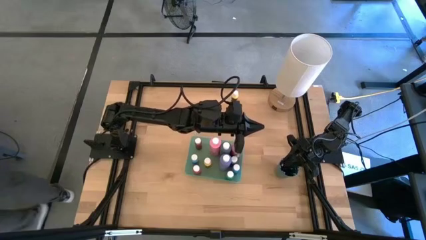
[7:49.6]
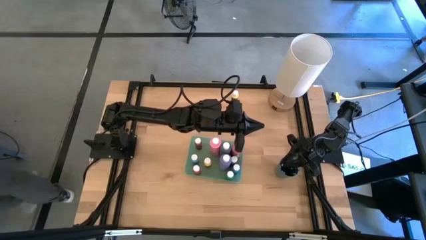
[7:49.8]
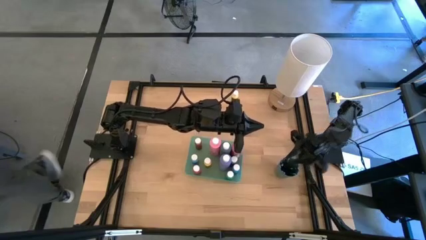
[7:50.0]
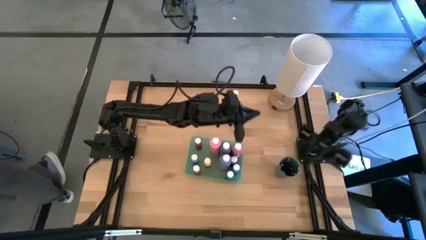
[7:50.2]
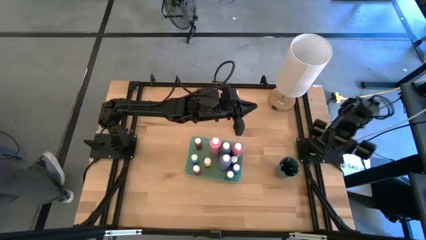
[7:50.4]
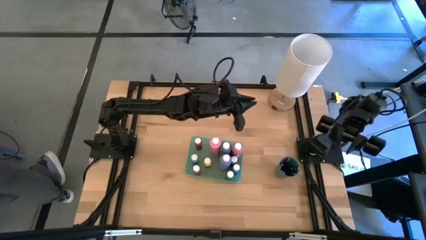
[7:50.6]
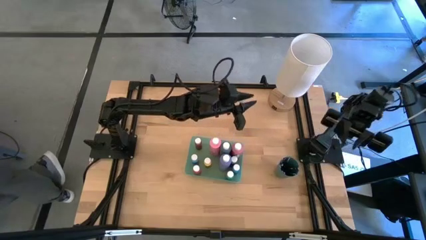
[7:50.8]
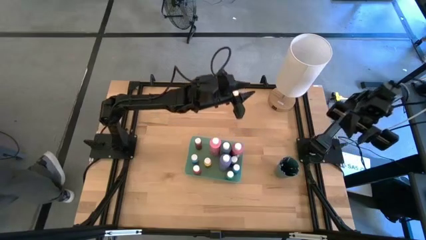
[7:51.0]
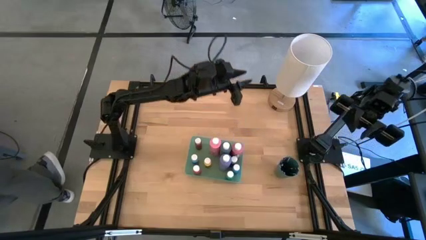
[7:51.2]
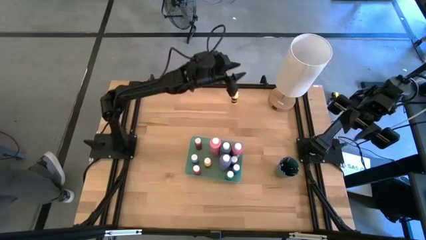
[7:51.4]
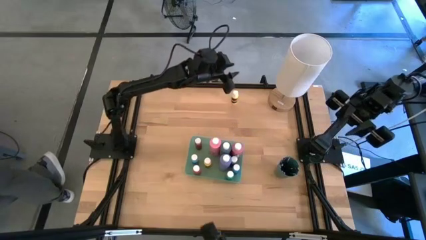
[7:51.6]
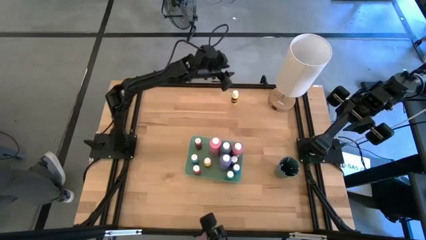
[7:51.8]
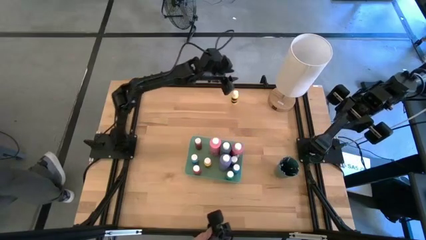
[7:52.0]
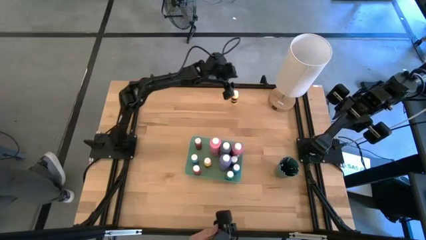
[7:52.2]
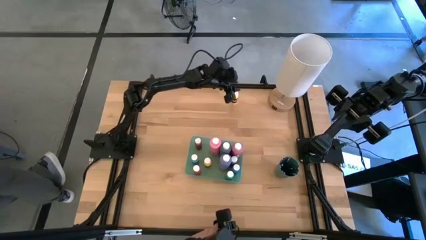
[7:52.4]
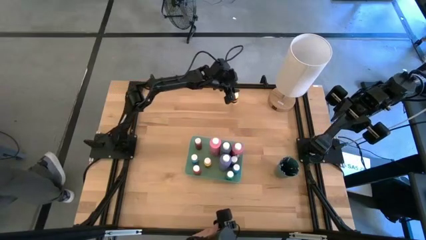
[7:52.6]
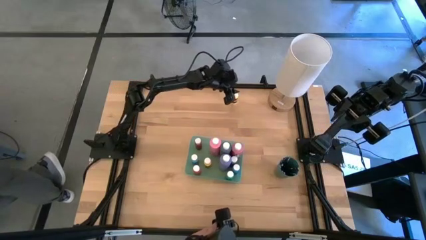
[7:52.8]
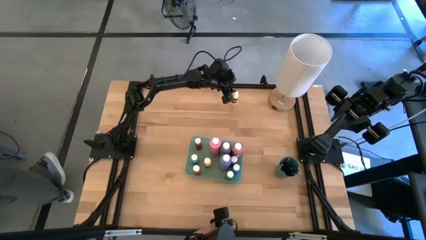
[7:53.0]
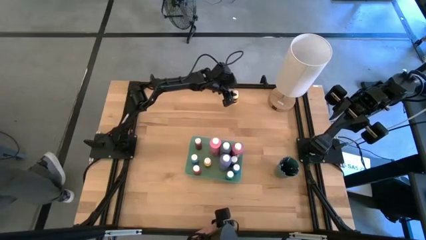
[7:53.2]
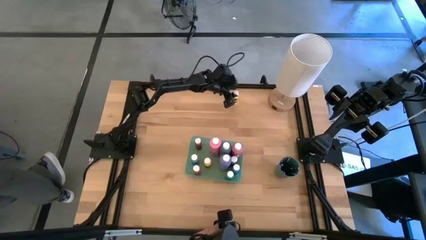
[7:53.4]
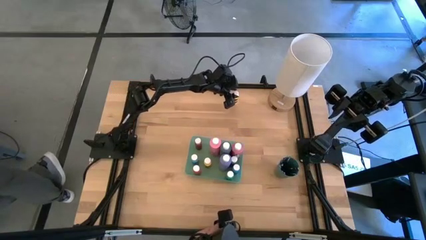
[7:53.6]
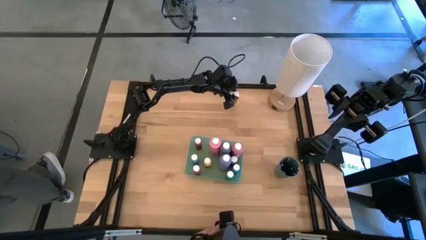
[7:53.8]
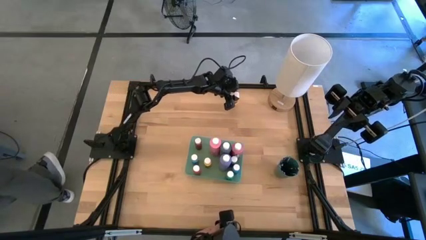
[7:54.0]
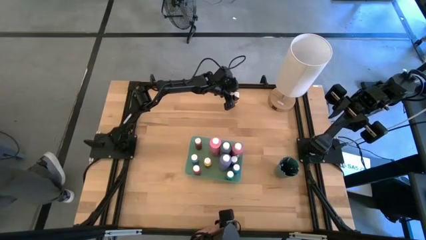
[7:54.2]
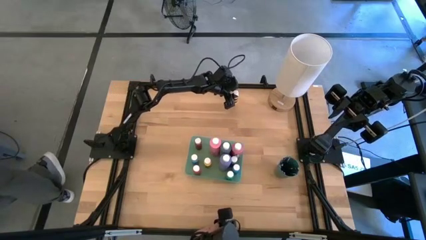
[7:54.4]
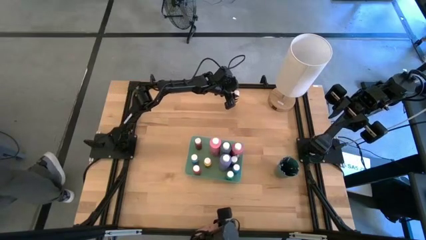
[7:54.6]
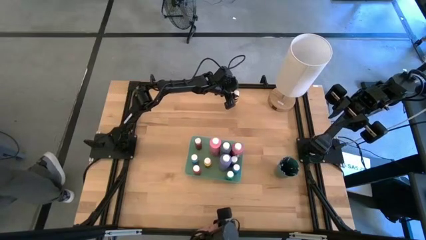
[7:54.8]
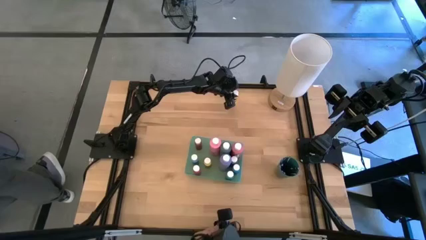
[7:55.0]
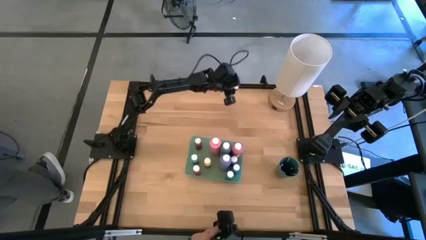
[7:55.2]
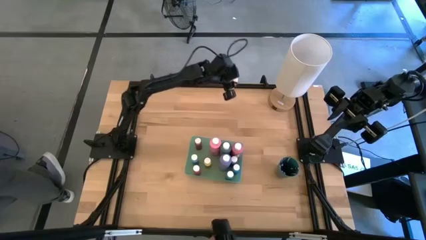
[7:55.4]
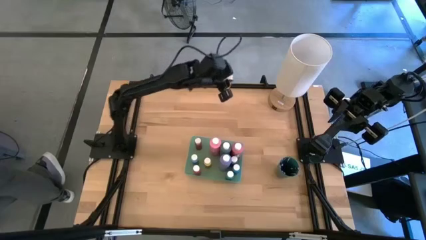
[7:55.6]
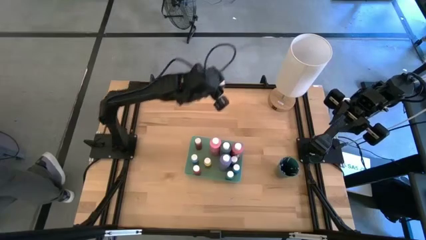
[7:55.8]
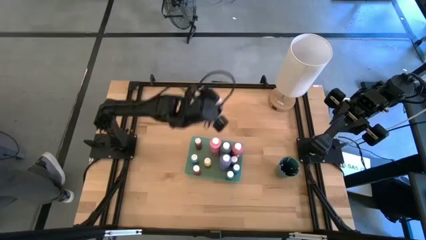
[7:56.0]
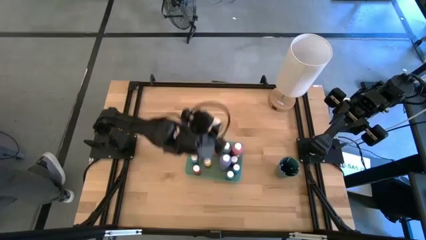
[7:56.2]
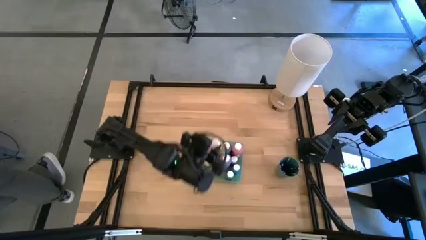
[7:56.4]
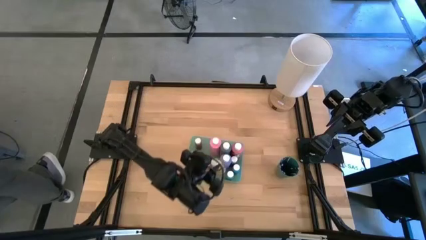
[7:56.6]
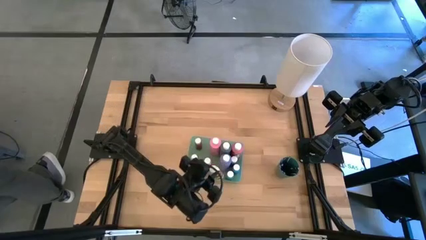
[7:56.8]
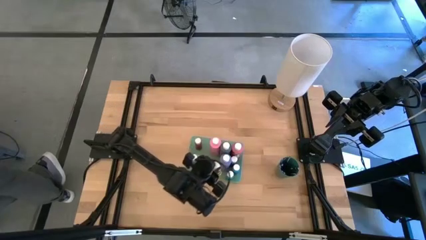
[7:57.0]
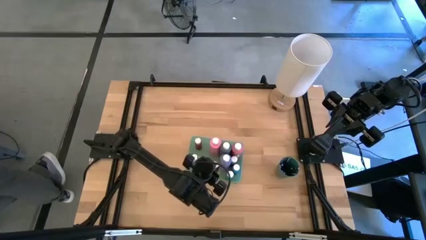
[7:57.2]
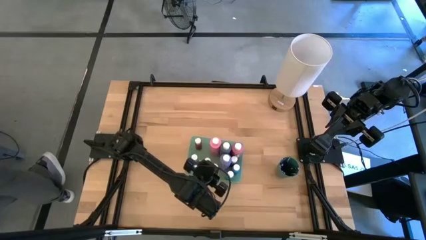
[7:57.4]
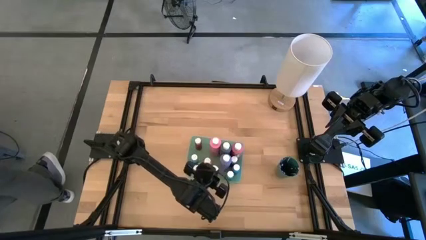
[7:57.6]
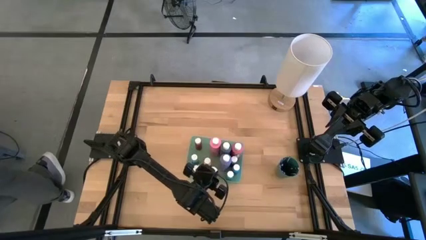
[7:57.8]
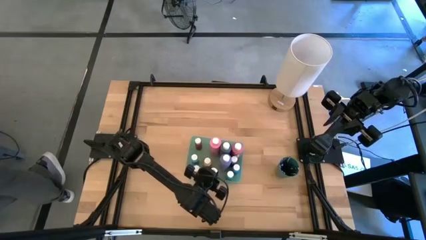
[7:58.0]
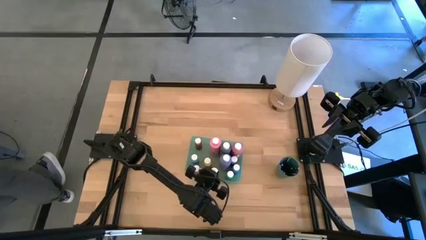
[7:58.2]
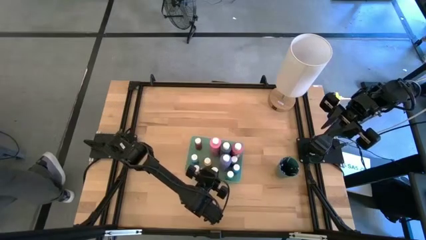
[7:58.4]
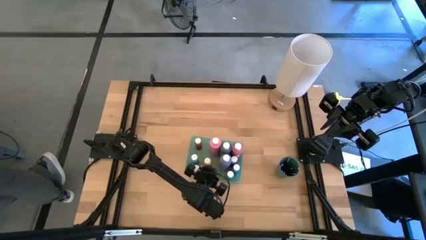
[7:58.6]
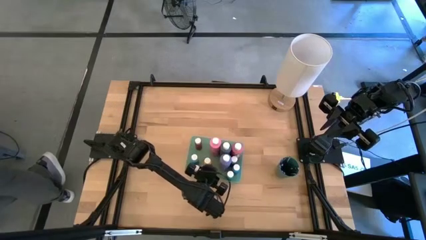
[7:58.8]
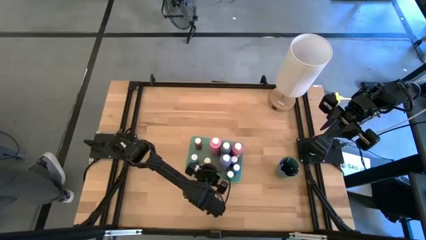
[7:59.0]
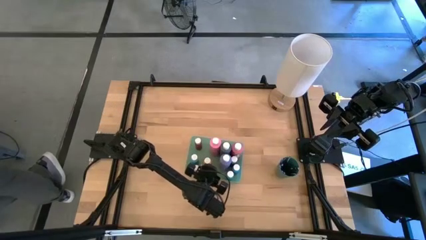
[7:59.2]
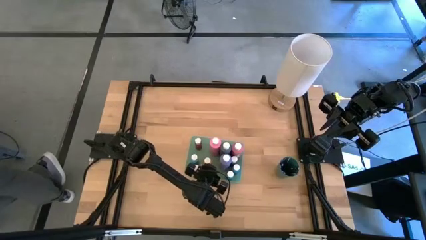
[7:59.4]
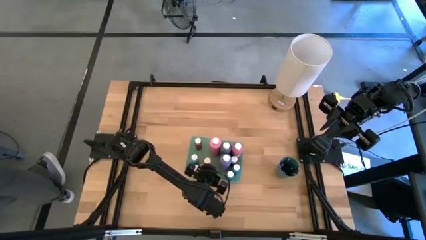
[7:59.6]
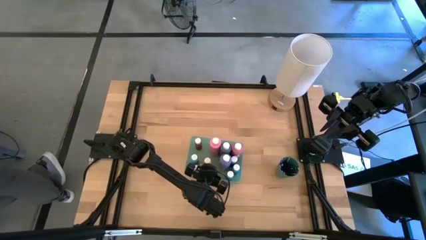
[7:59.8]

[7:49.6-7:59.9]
Task: Pick & Place Paint Supplies
Put the yellow paint bottle into the light green bin

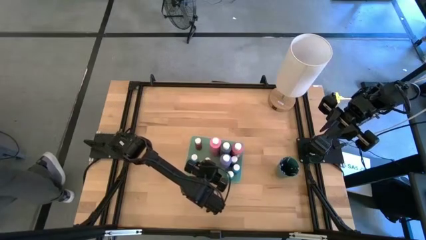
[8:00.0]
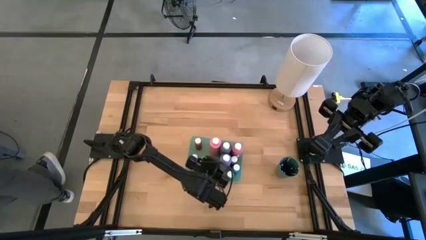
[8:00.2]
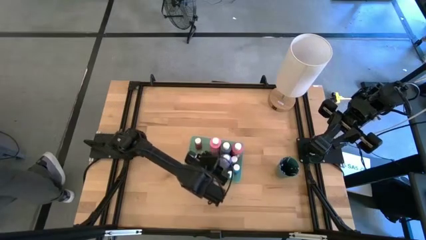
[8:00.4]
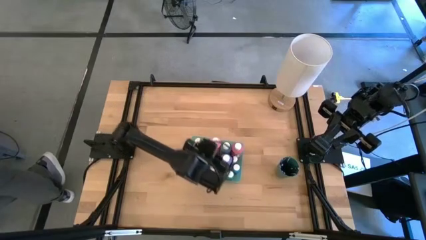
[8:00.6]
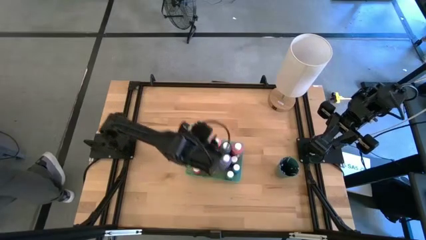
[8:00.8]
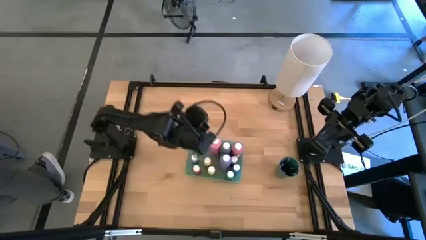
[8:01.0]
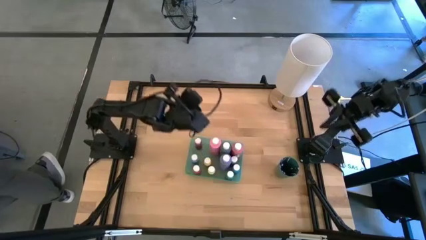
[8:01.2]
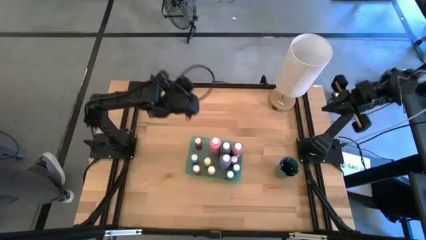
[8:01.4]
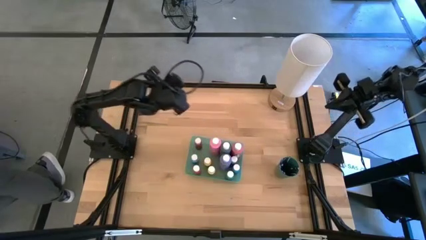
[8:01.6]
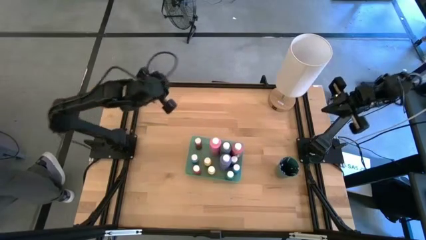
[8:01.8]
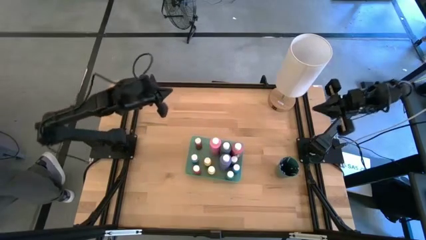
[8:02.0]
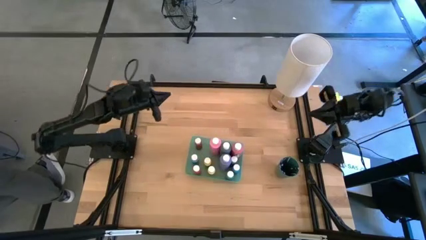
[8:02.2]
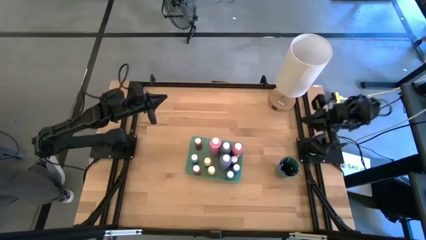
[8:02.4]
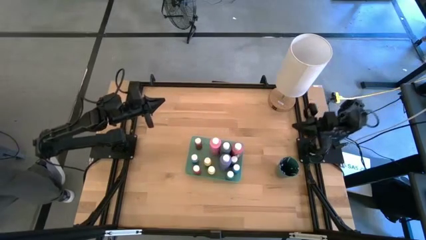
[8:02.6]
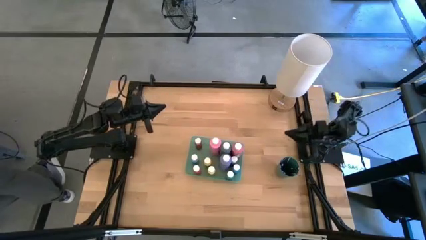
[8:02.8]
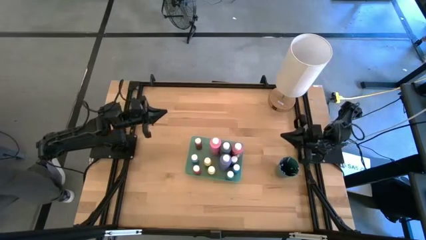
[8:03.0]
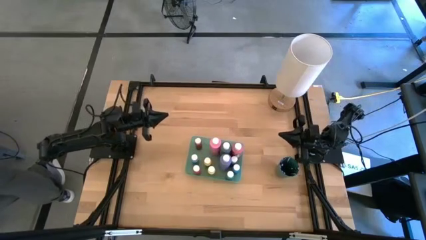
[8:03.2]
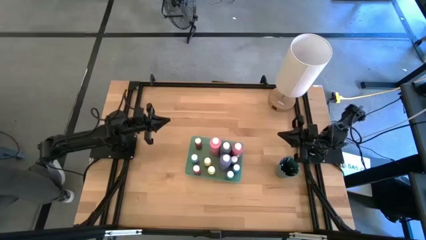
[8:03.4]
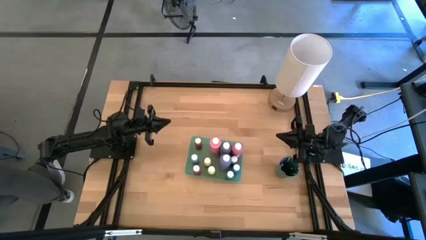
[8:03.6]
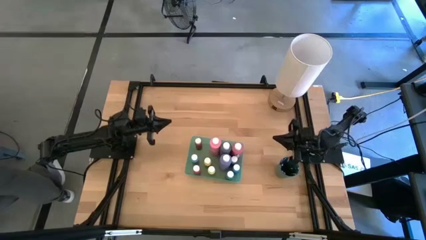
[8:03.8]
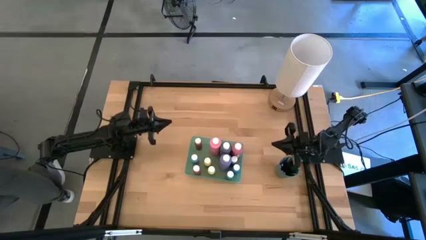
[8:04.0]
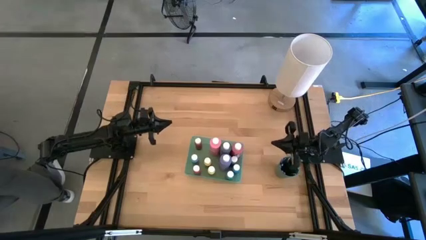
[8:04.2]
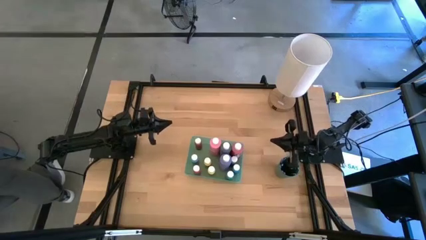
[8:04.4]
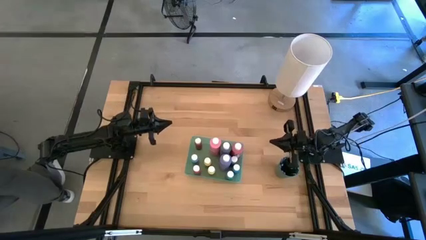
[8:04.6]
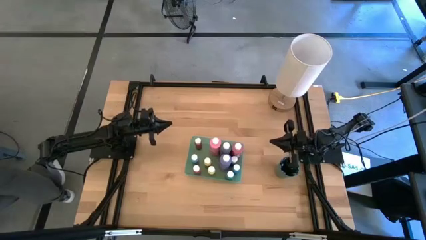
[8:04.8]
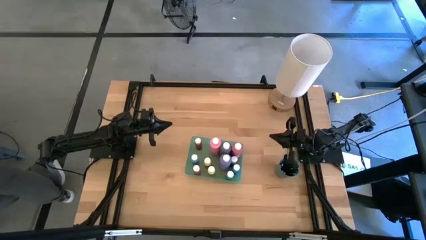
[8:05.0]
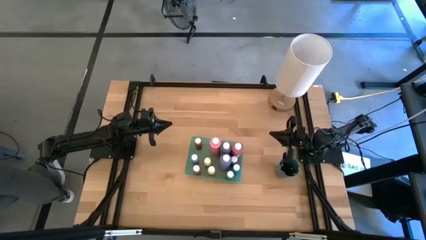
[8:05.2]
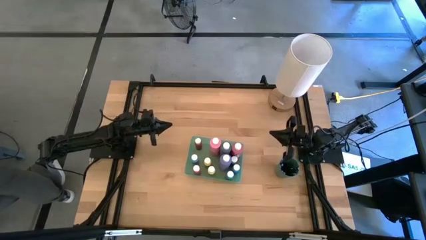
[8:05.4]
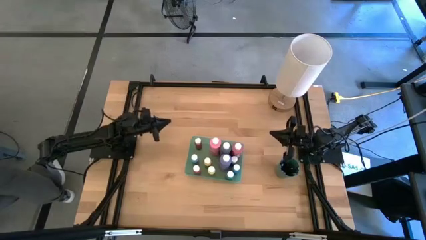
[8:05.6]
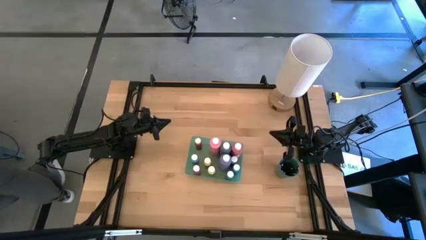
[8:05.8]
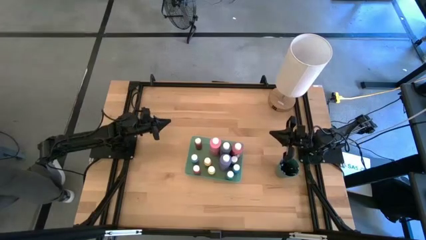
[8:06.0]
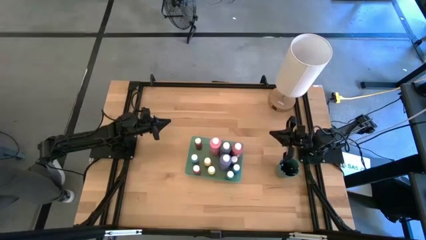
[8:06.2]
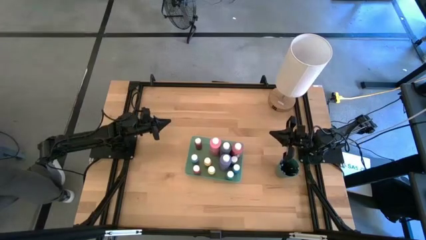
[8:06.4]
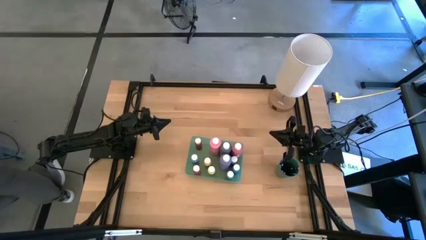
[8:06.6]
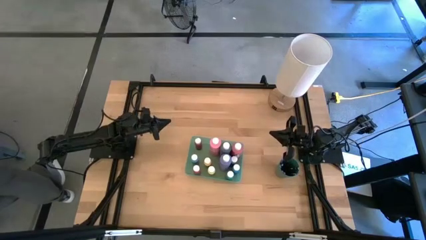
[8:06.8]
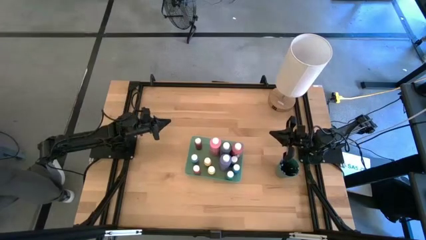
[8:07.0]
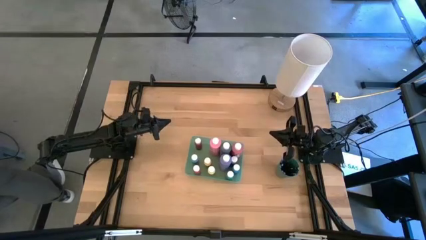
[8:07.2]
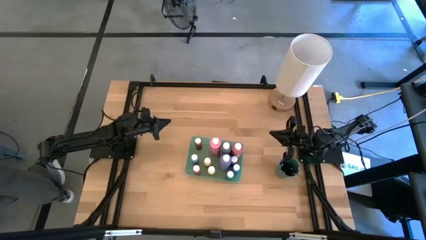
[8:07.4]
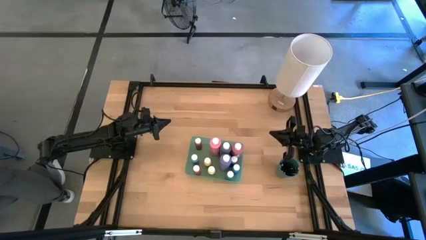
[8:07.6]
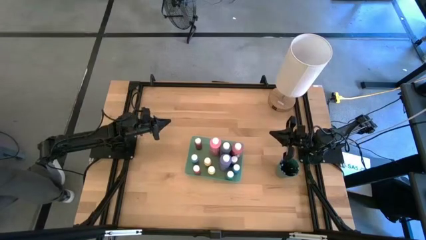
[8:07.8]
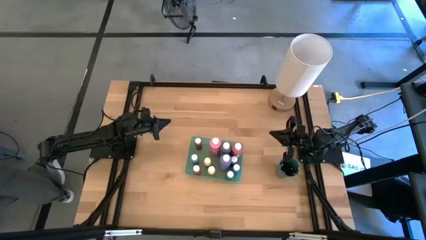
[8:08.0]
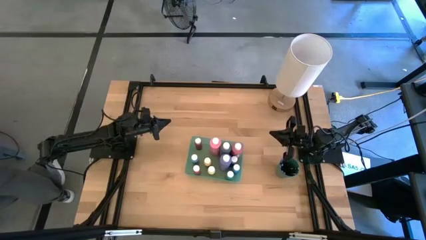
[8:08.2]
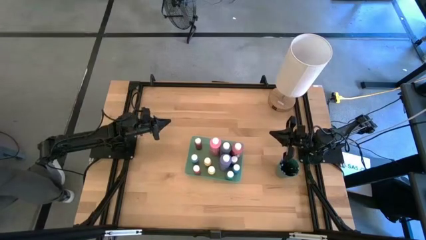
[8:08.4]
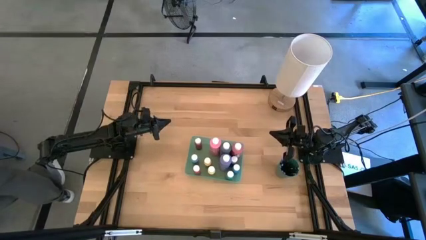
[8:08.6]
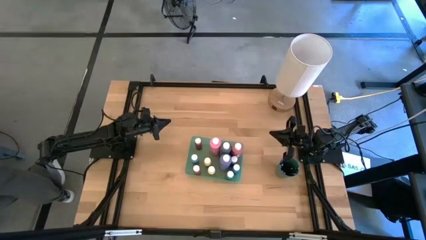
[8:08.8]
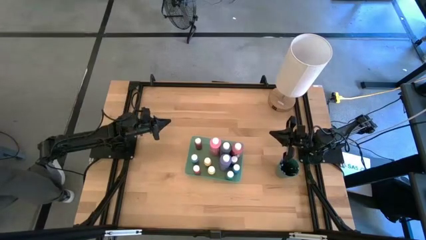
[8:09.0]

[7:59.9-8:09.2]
Return to Home Position
